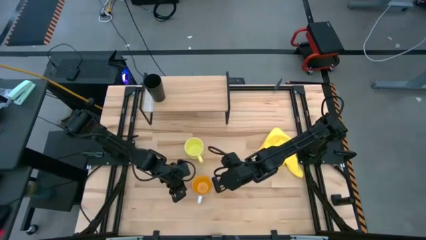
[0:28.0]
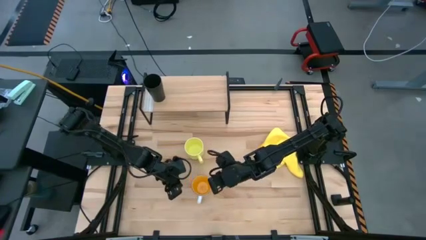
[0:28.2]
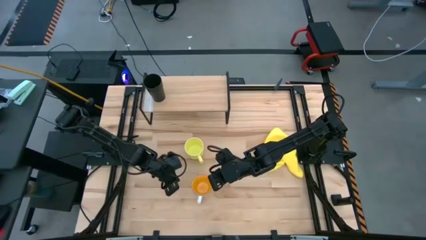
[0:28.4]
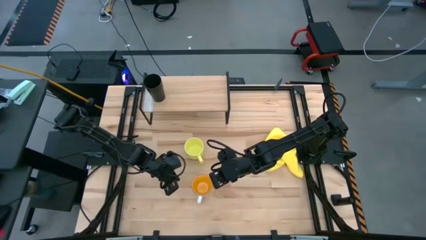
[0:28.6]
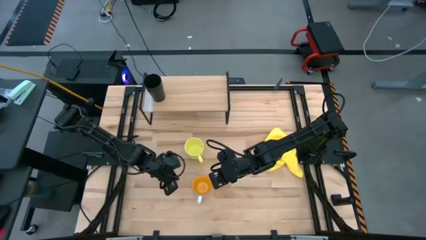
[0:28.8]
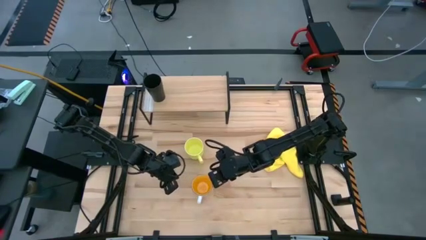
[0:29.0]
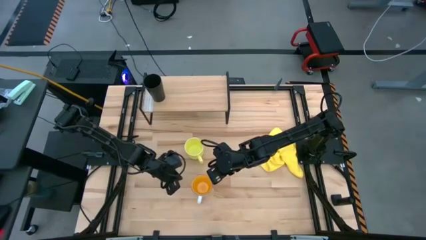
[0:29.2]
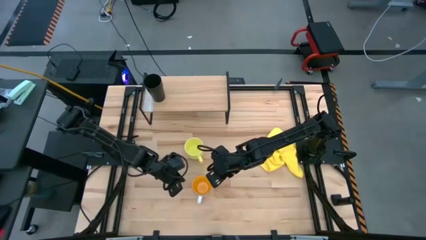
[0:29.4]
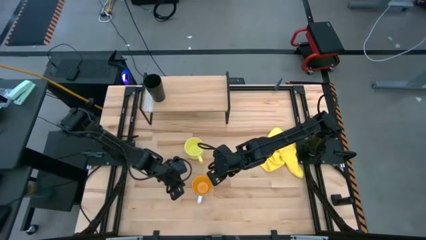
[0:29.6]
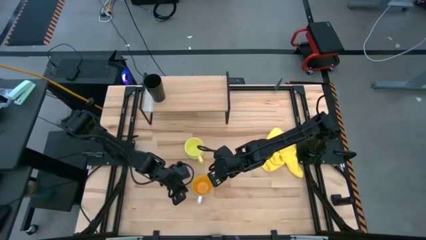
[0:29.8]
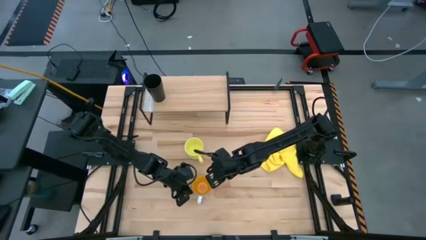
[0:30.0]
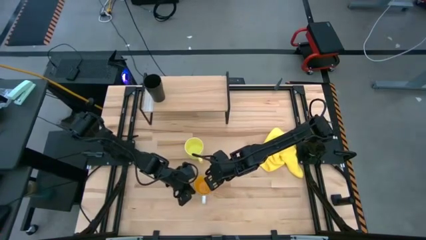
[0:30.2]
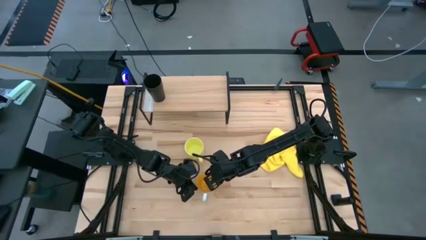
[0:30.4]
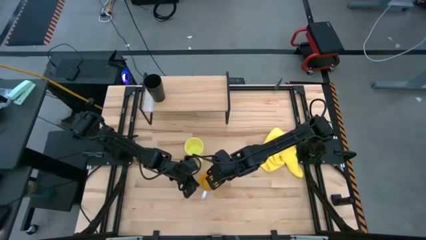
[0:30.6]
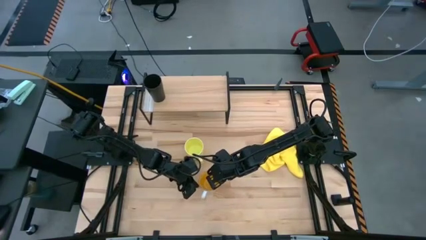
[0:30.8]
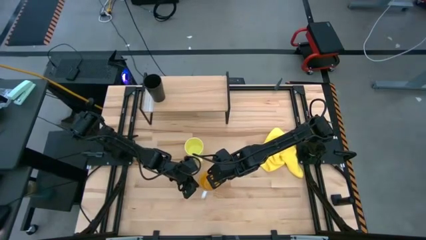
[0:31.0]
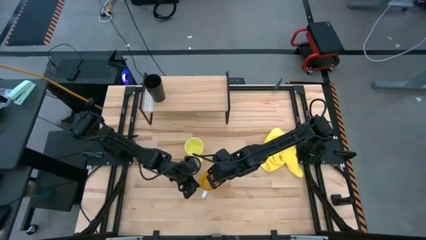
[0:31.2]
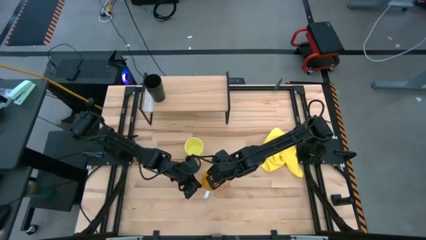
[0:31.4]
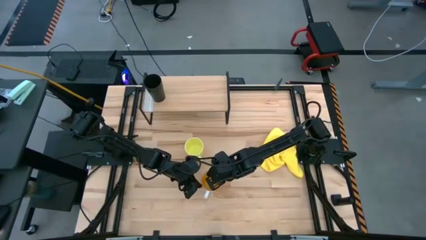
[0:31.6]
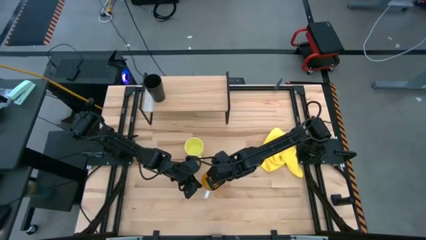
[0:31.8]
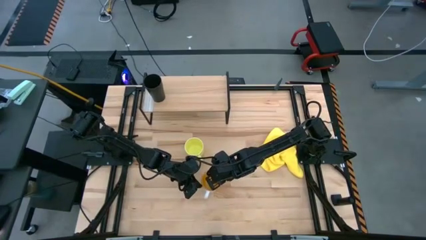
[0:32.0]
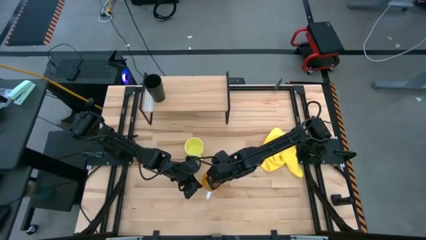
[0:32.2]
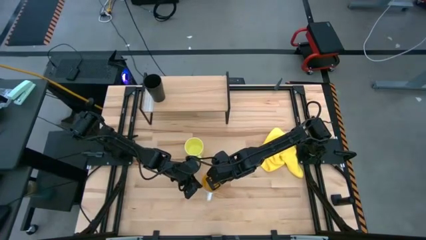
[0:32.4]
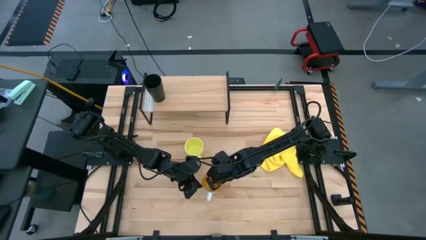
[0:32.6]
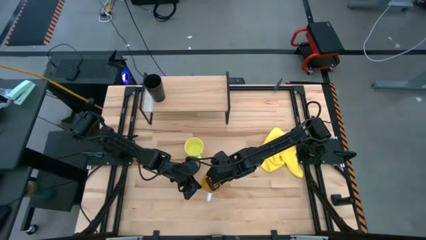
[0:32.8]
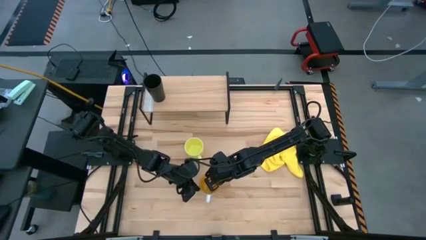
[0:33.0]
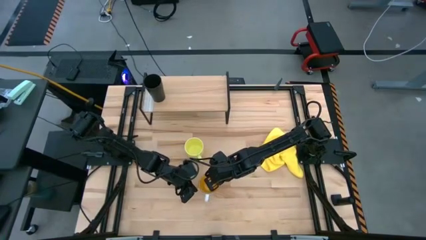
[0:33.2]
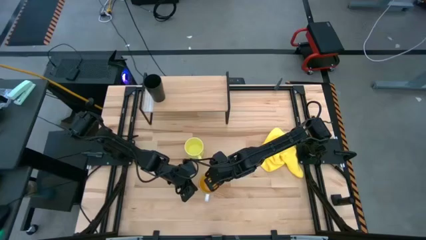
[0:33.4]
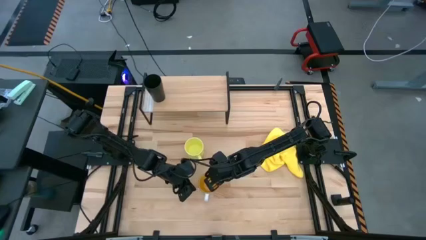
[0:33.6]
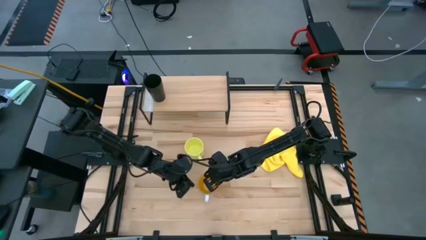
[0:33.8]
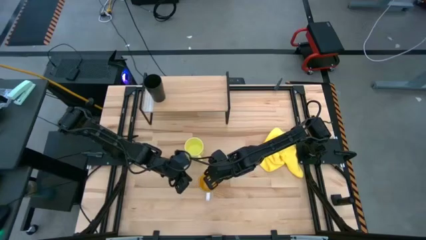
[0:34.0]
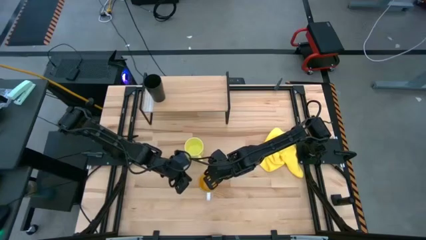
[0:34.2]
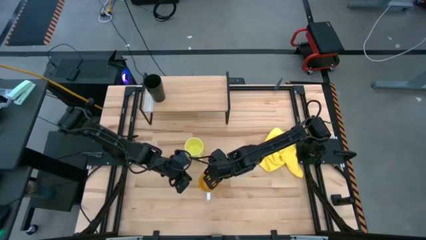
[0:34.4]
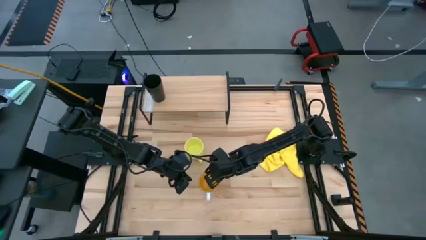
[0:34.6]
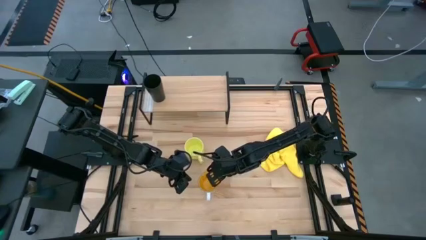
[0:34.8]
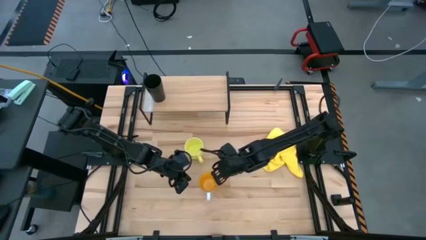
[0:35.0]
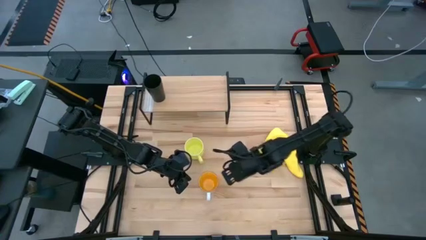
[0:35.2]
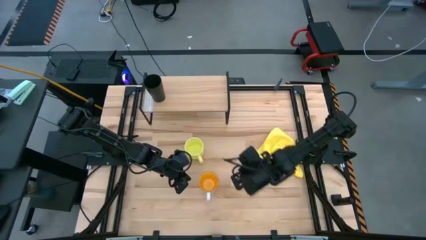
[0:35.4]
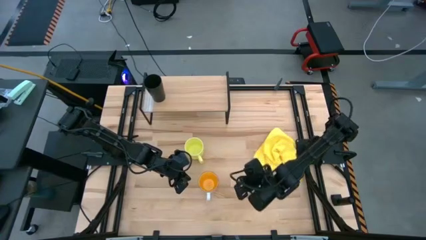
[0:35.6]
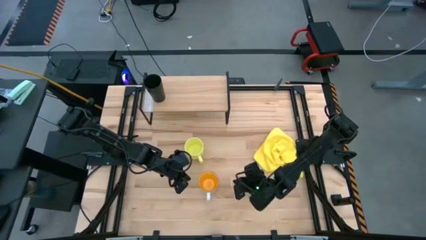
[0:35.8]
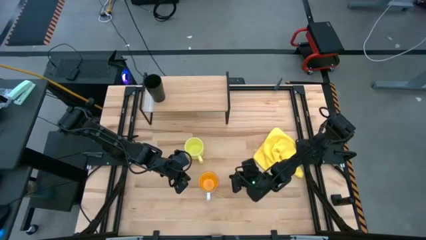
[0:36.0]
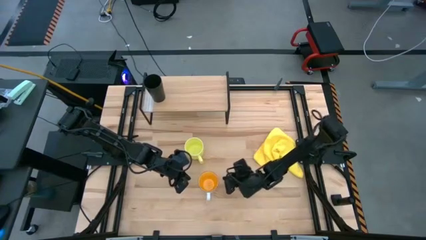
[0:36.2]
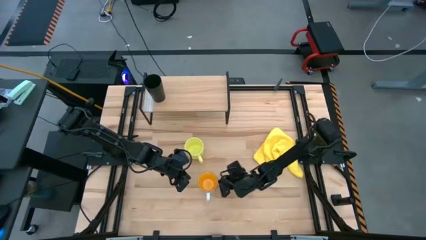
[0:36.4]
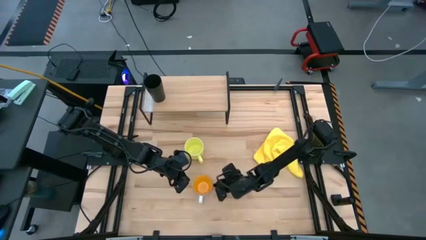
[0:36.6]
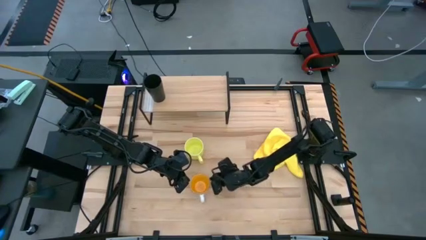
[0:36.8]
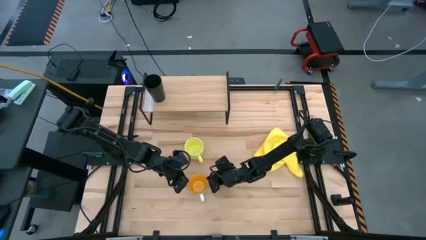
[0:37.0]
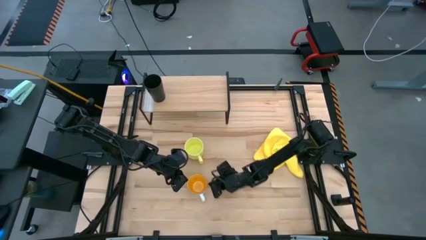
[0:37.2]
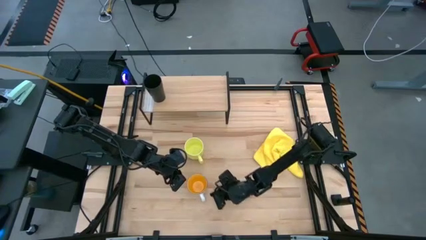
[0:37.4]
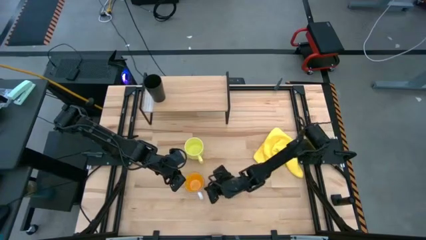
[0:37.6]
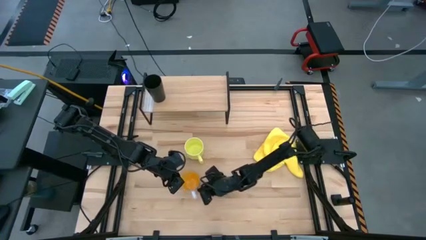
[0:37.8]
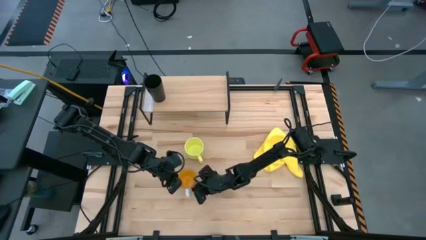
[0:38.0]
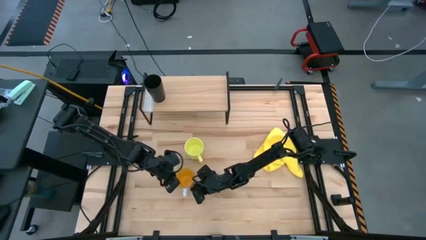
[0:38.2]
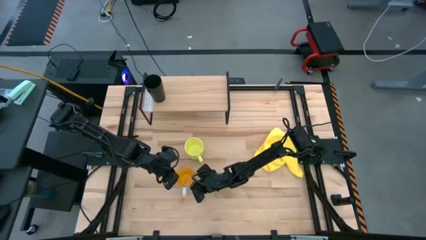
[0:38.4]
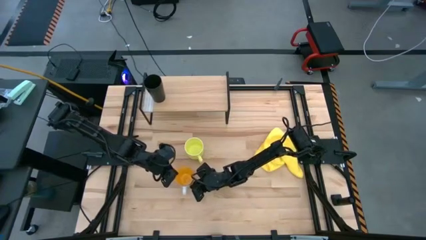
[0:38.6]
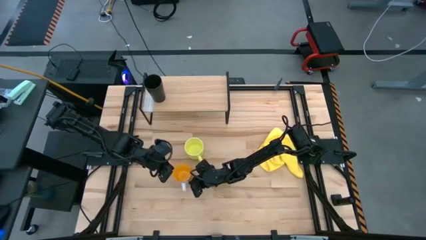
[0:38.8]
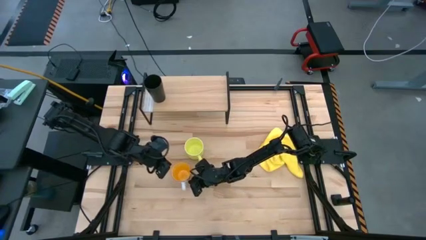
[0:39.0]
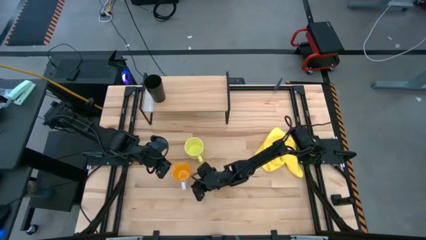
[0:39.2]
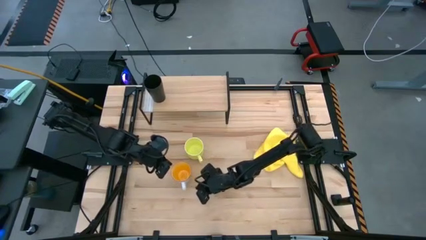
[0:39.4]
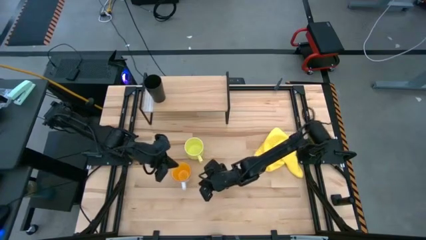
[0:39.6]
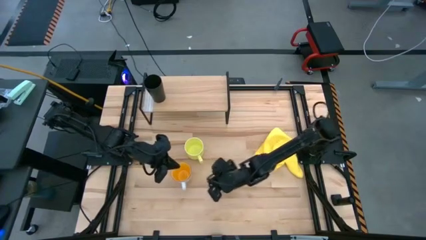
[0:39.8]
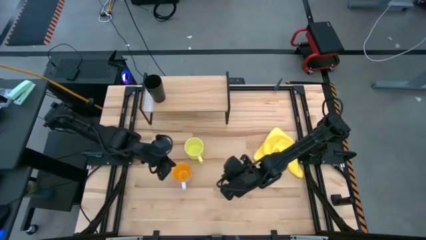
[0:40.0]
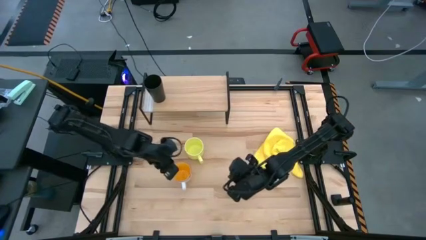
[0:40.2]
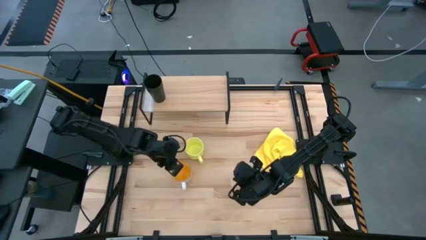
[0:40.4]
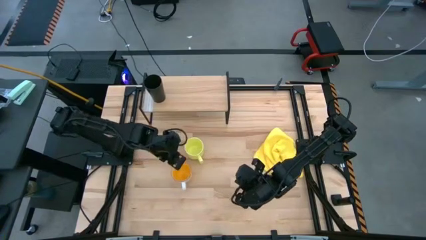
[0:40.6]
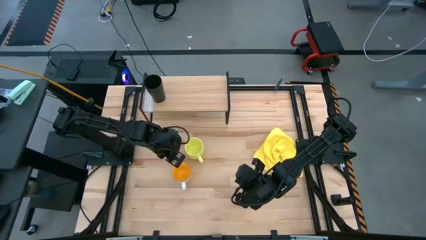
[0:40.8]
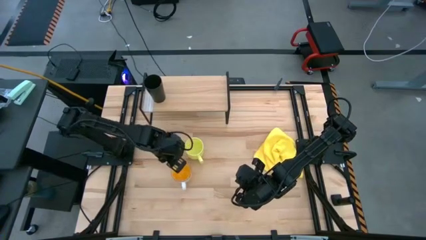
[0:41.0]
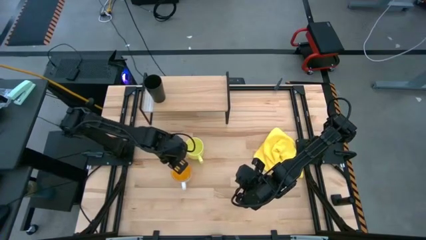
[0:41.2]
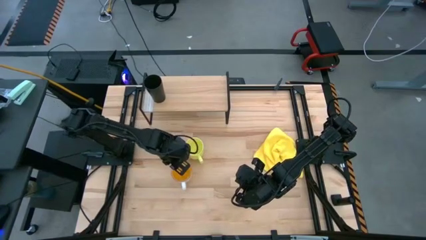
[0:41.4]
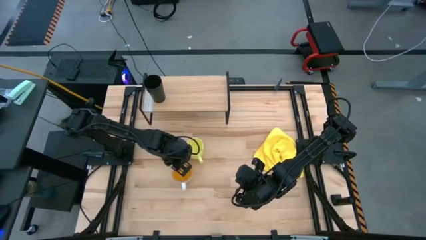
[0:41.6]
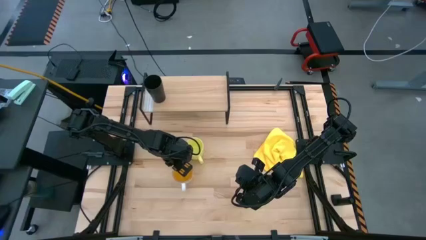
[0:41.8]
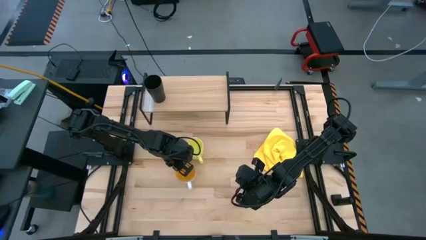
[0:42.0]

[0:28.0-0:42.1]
Task: Stack small to large cups/mugs on shelf
Put the orange mug on the shelf
